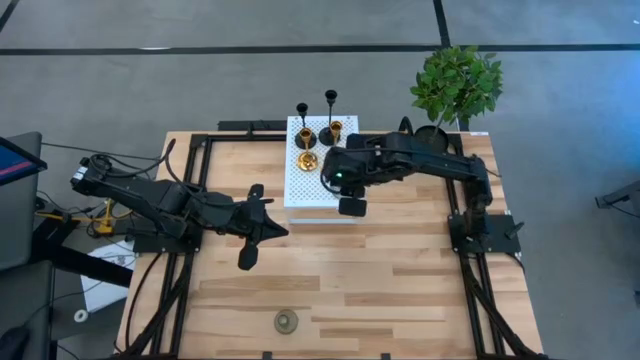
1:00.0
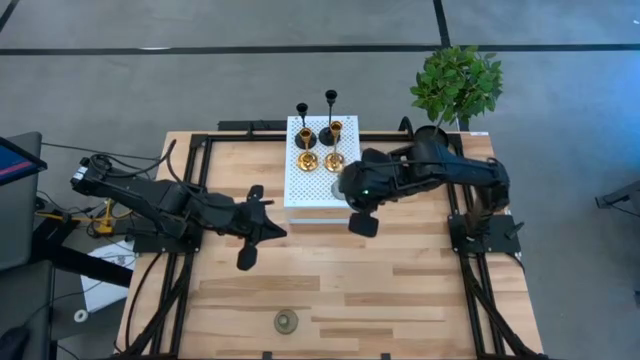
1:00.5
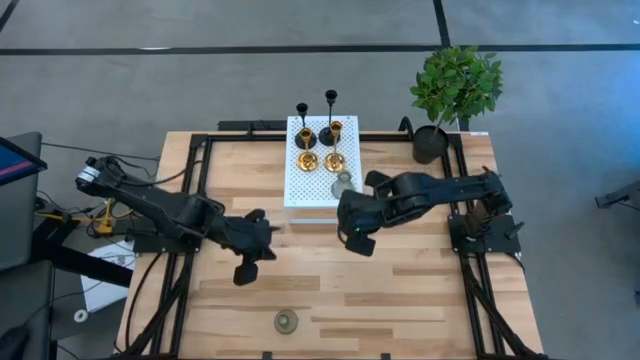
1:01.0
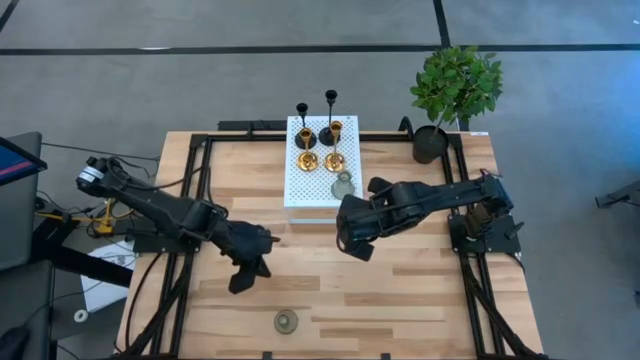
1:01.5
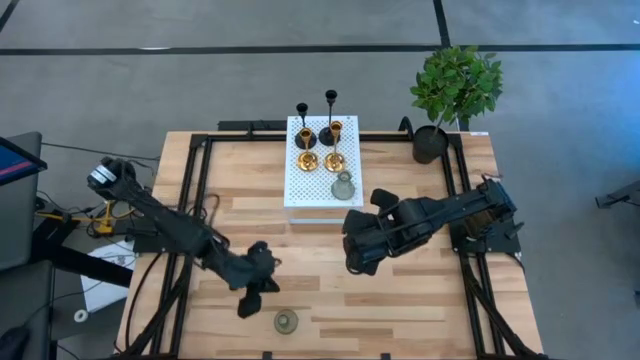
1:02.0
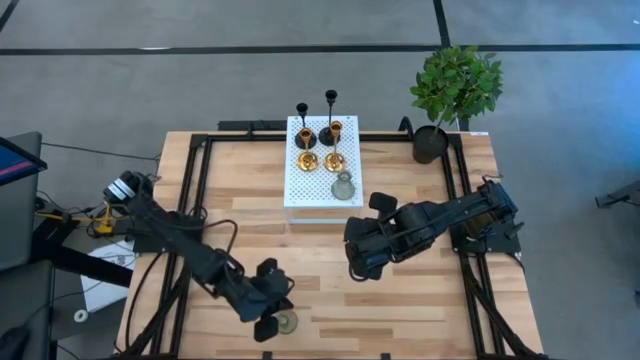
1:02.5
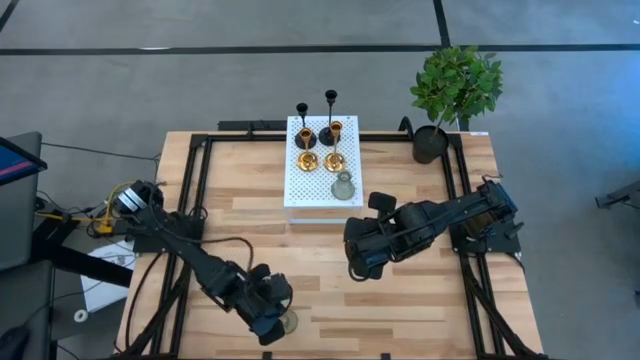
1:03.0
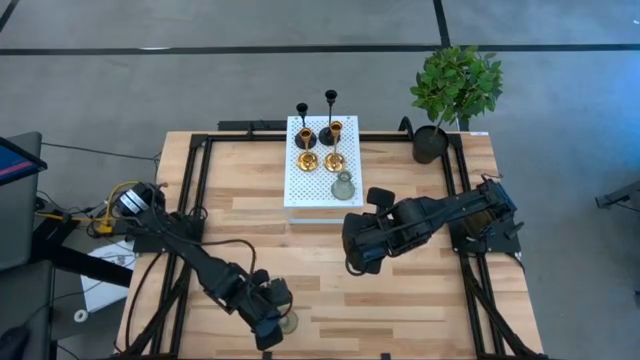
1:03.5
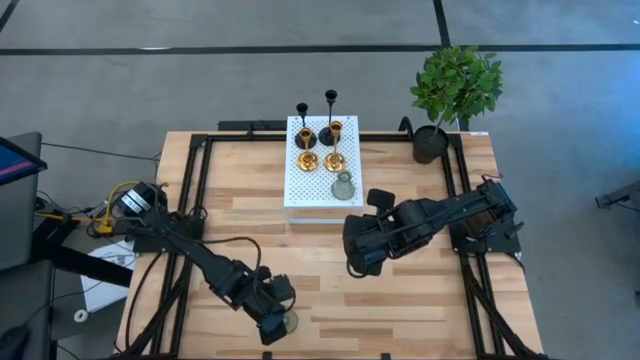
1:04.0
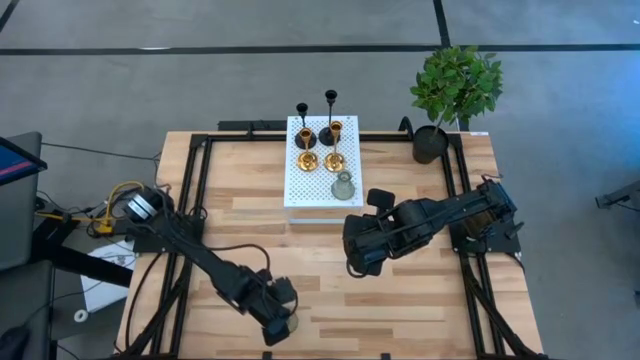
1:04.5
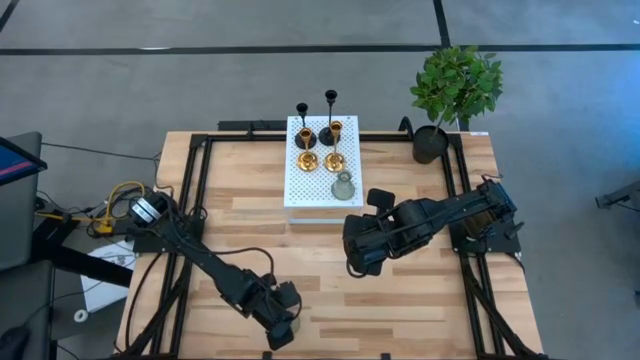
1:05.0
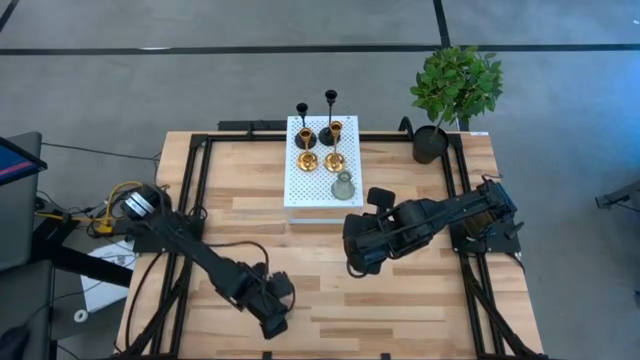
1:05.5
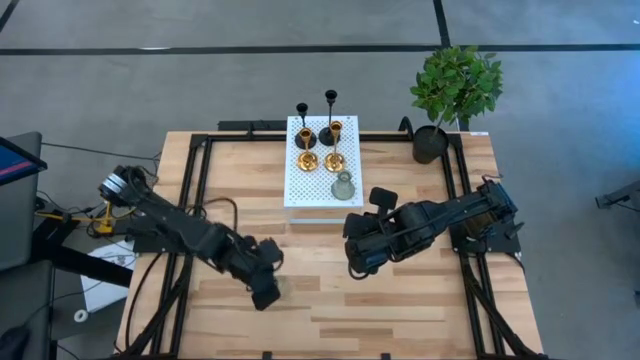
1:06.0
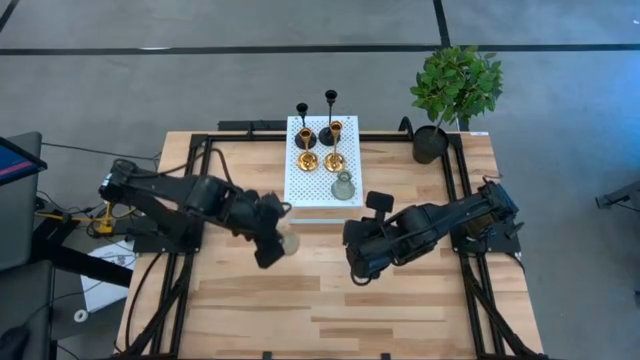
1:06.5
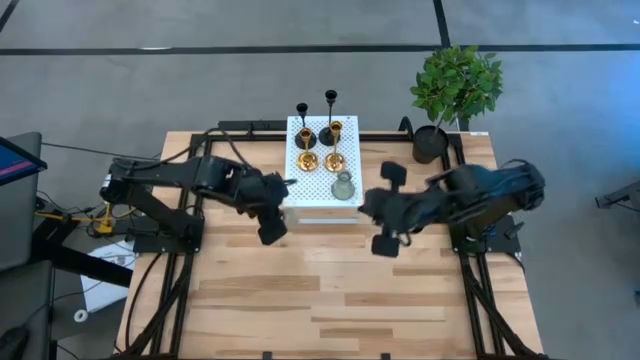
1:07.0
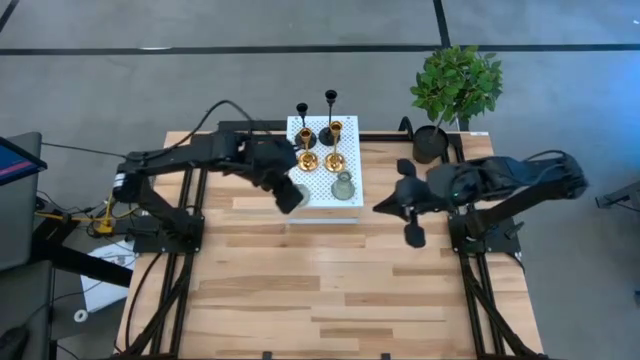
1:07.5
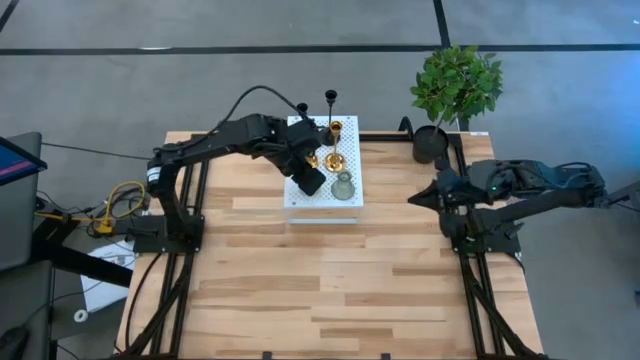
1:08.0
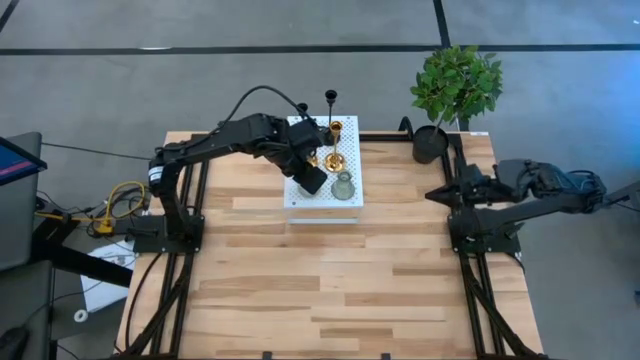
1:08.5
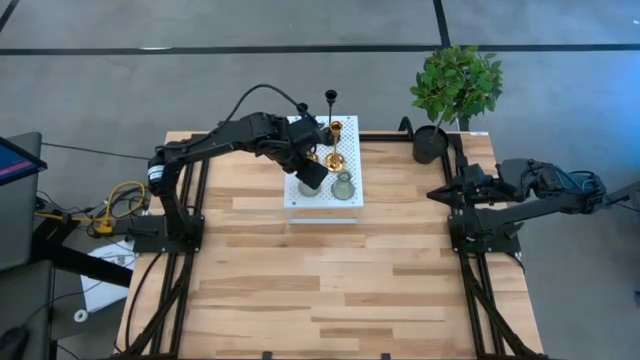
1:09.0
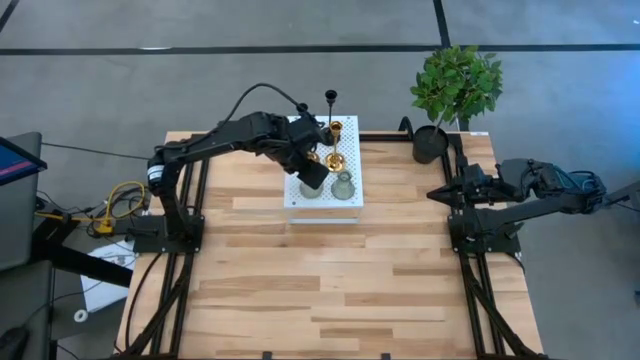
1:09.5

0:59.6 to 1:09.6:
Task: Pick & Place candle stick holders
Put the green glass candle holder aligned with the other green glass candle holder on the shelf

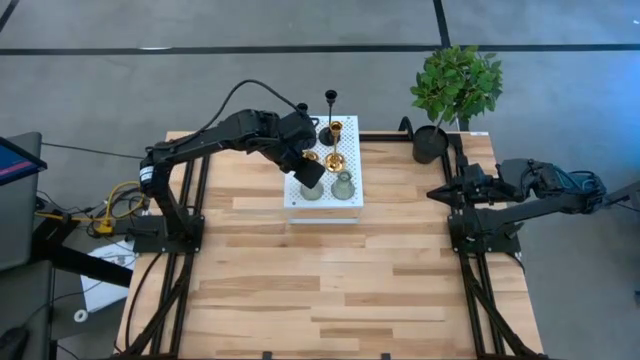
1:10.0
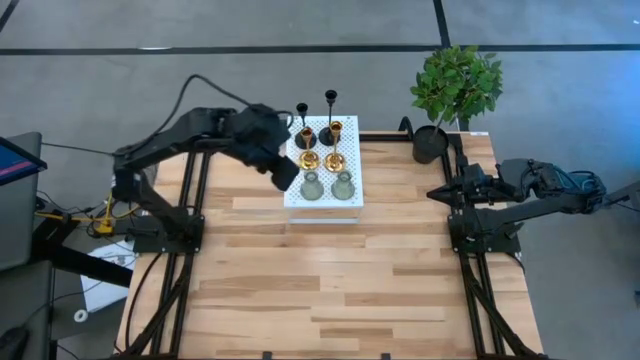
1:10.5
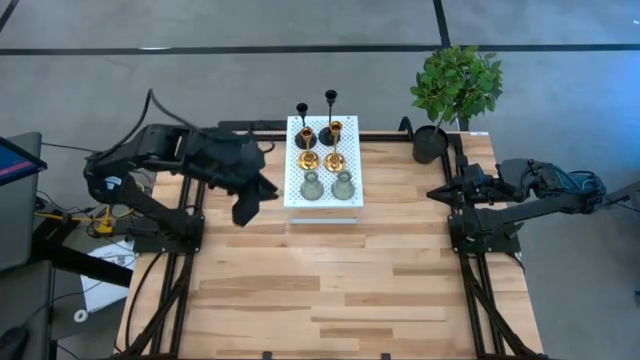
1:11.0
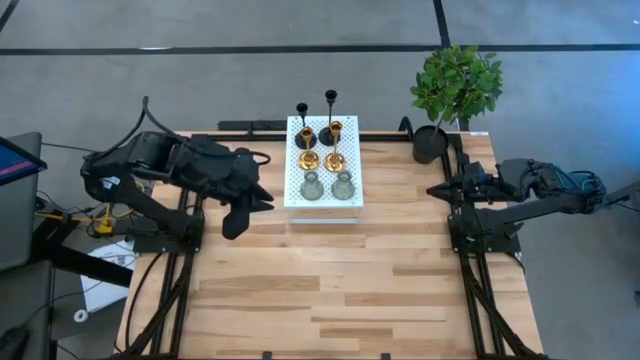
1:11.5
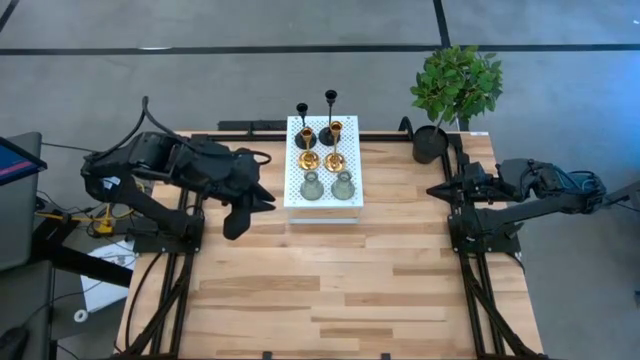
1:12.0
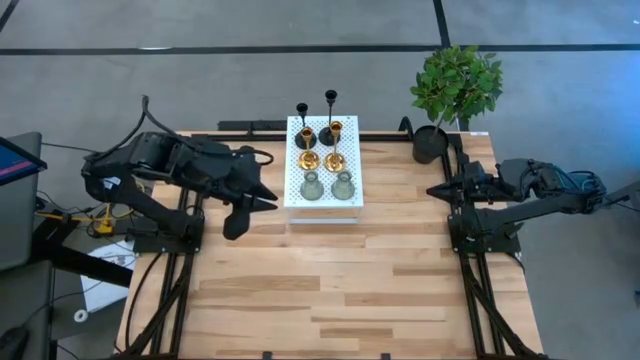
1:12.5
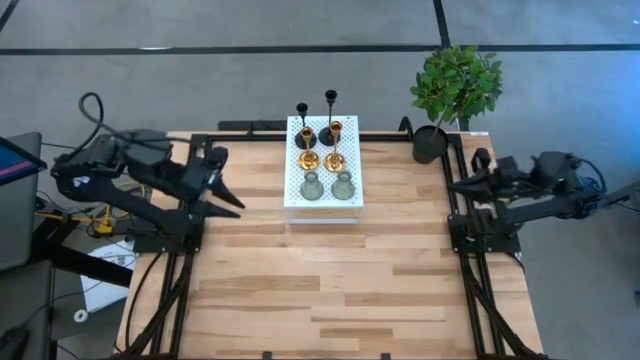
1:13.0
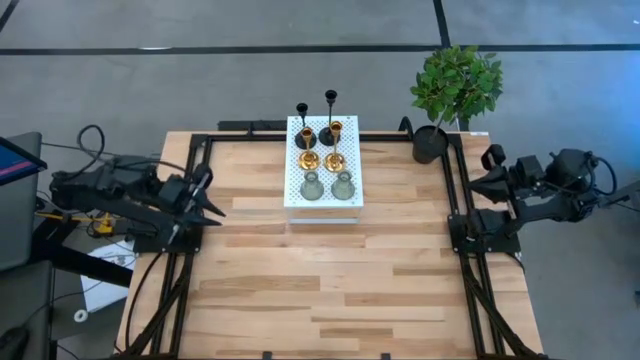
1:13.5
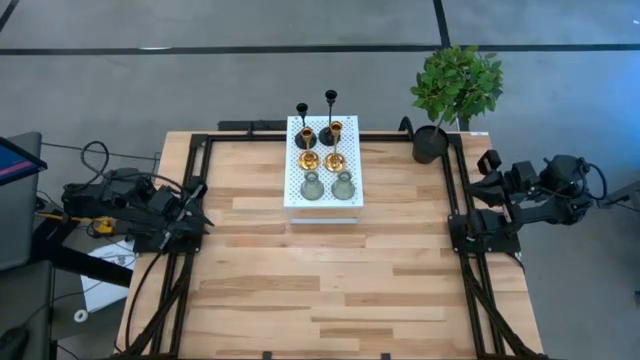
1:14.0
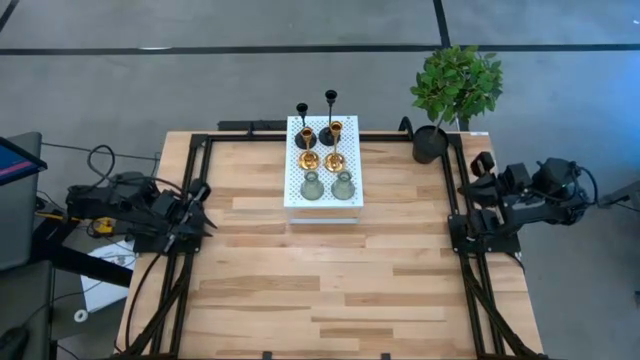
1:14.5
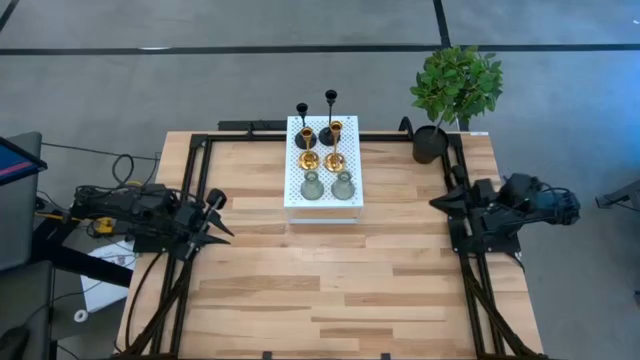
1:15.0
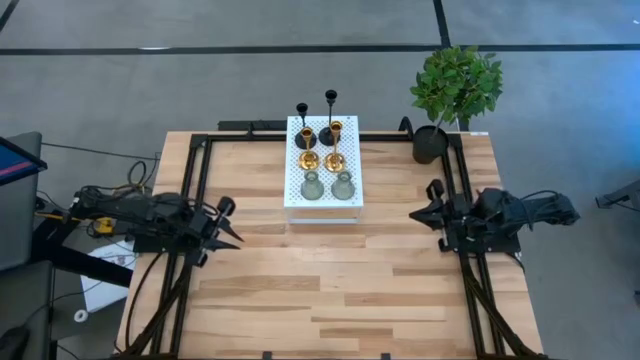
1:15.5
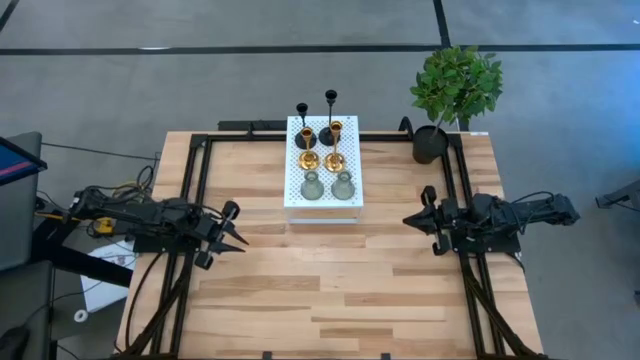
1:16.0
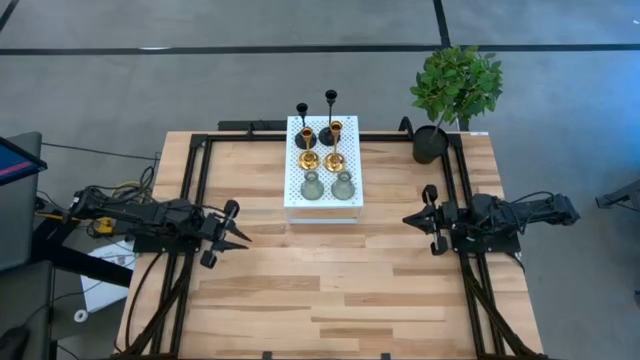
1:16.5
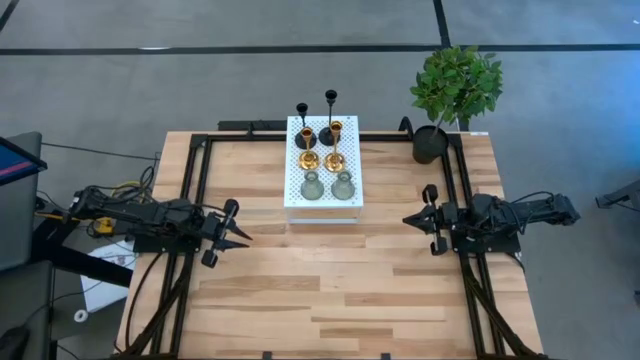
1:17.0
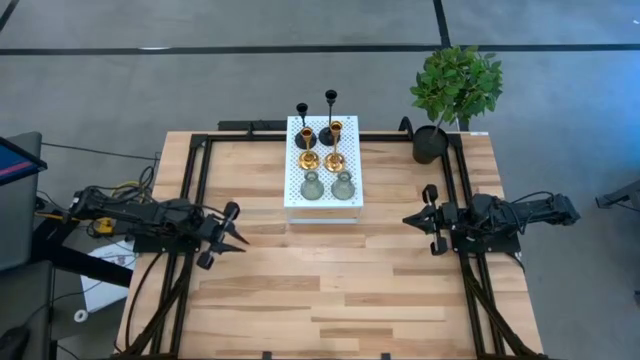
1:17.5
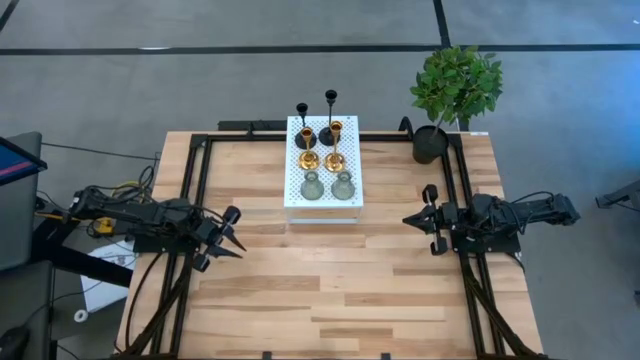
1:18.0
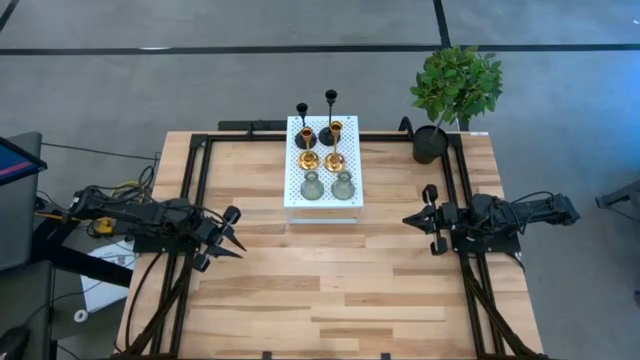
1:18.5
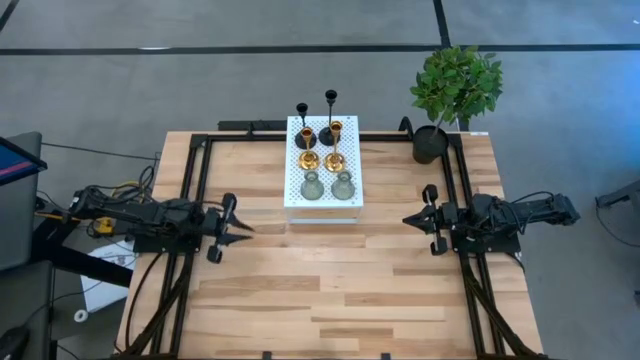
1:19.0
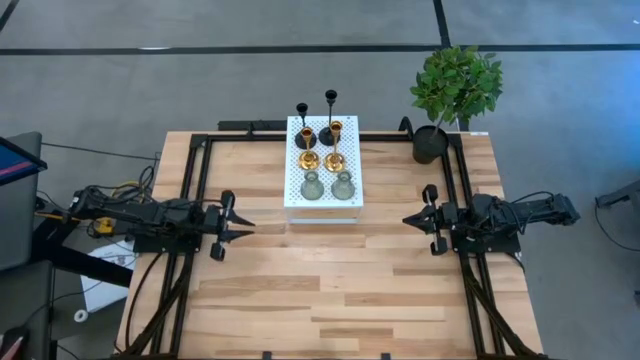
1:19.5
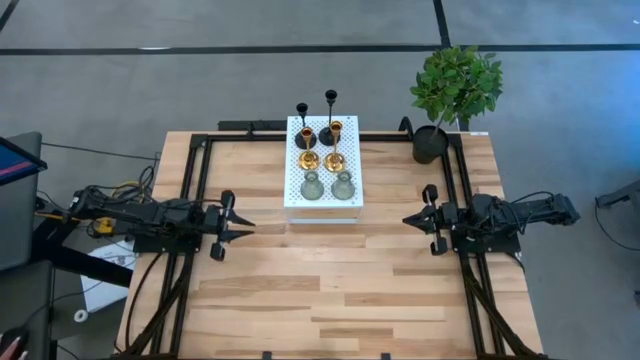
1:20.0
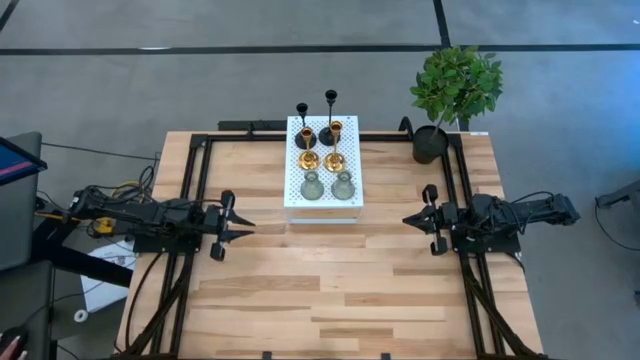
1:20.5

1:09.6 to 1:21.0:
Return to Home Position
